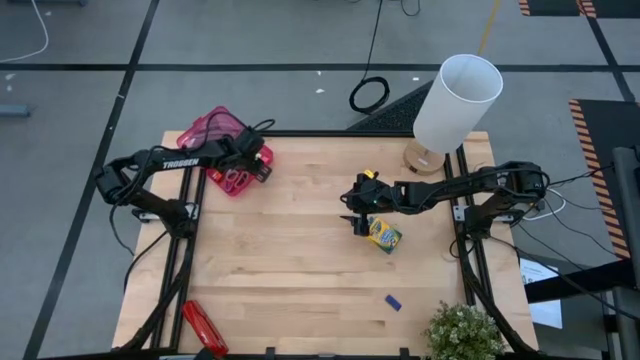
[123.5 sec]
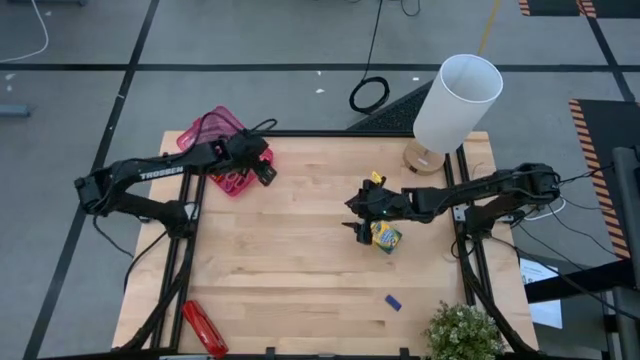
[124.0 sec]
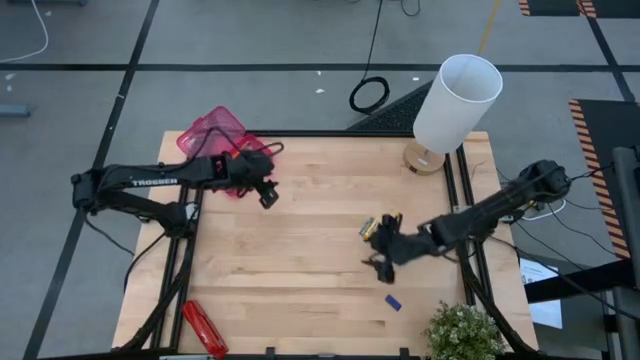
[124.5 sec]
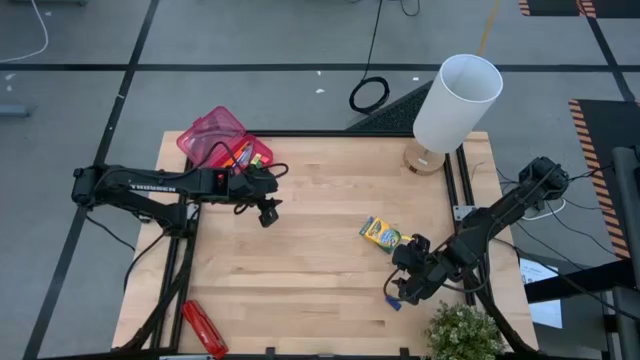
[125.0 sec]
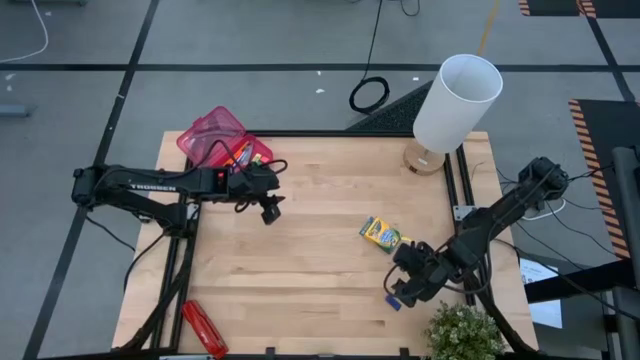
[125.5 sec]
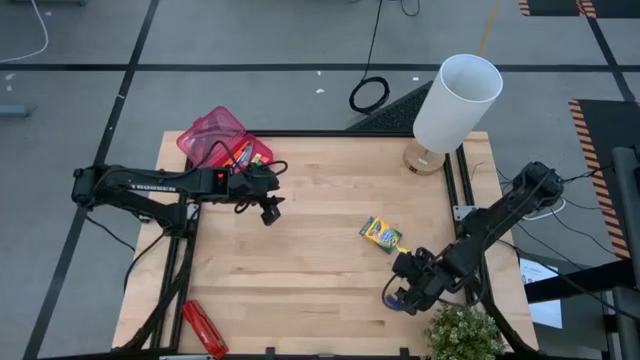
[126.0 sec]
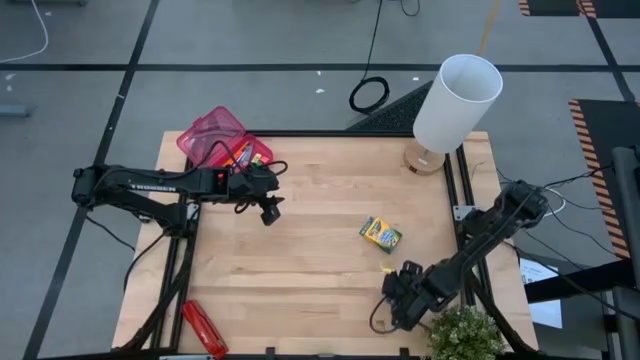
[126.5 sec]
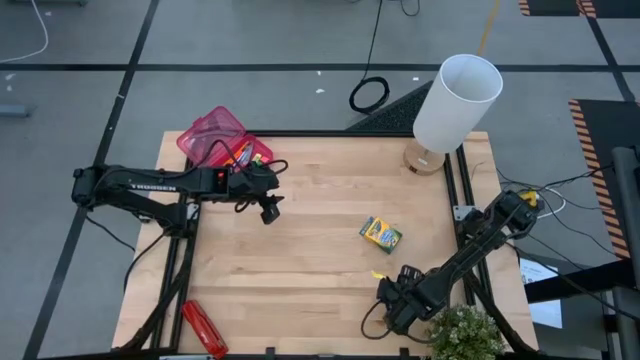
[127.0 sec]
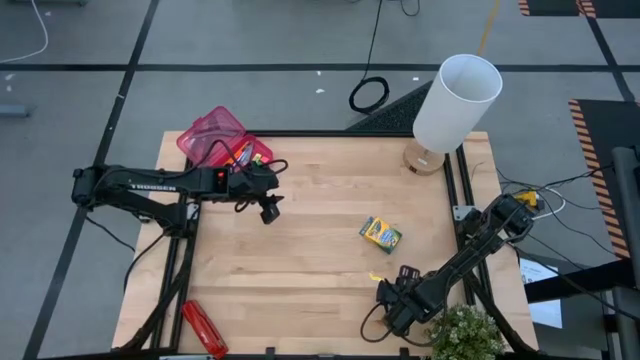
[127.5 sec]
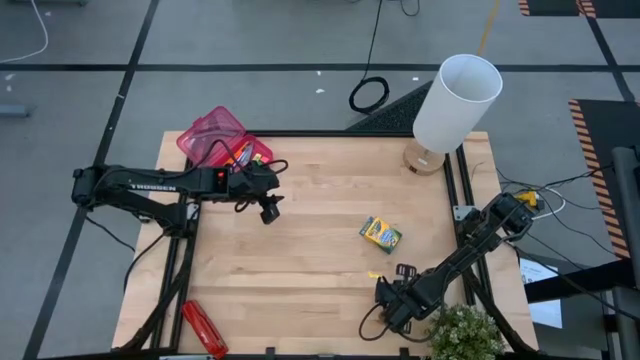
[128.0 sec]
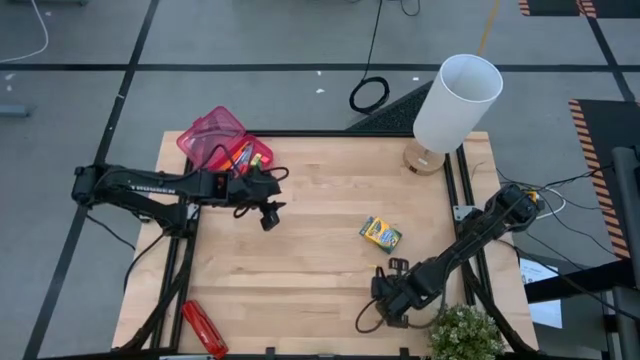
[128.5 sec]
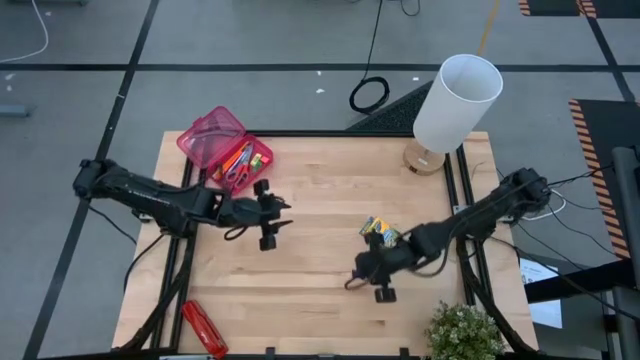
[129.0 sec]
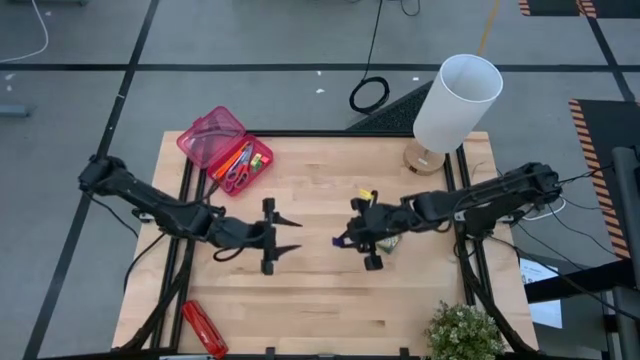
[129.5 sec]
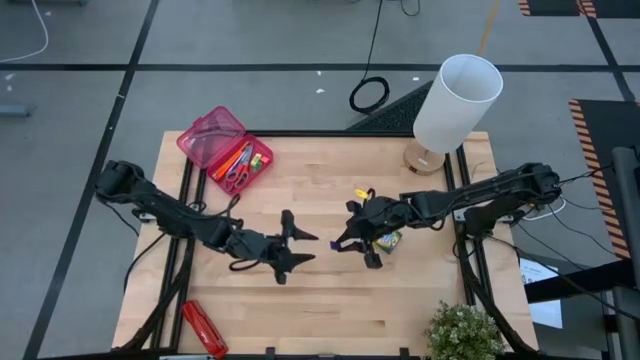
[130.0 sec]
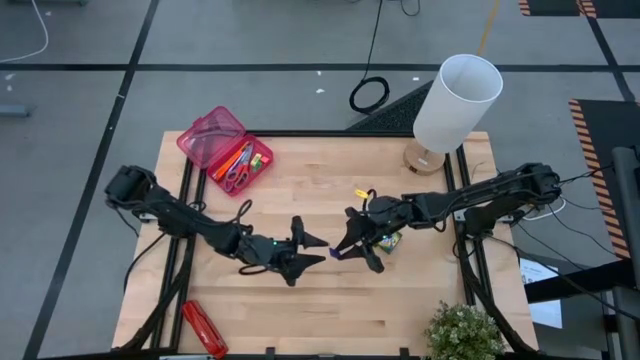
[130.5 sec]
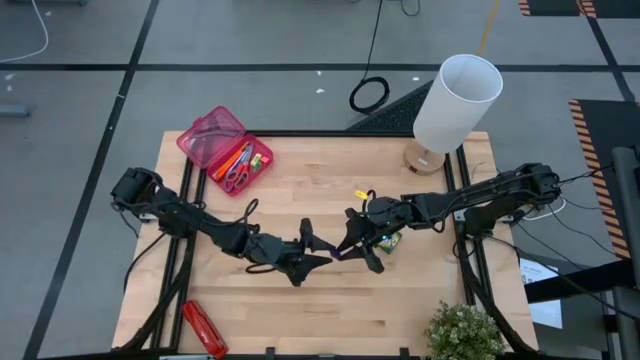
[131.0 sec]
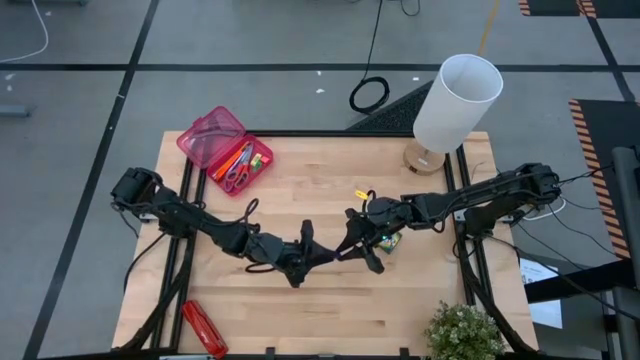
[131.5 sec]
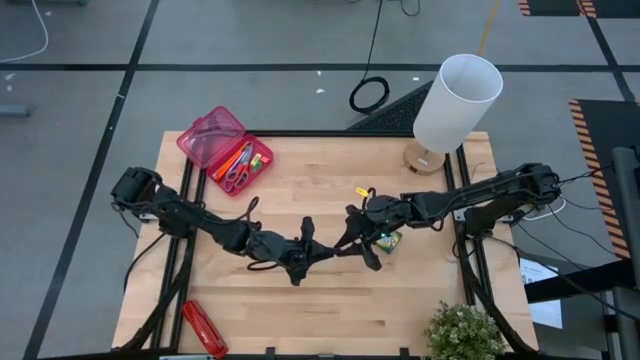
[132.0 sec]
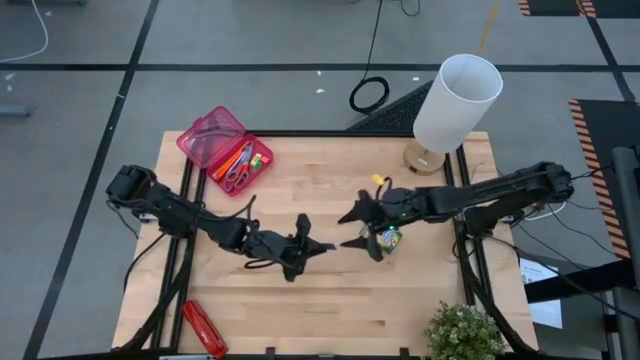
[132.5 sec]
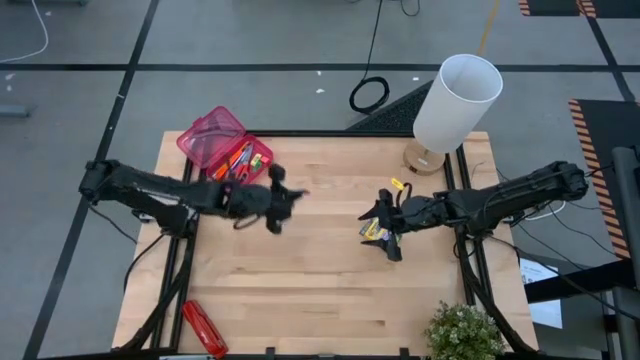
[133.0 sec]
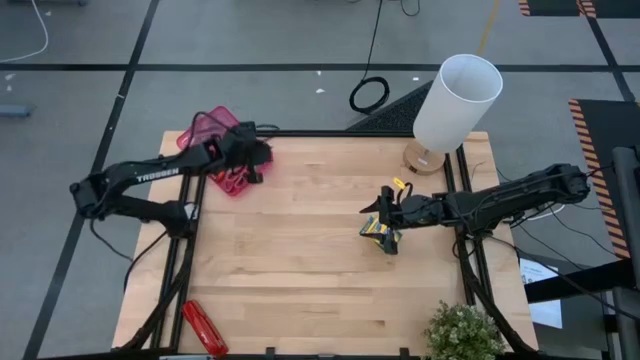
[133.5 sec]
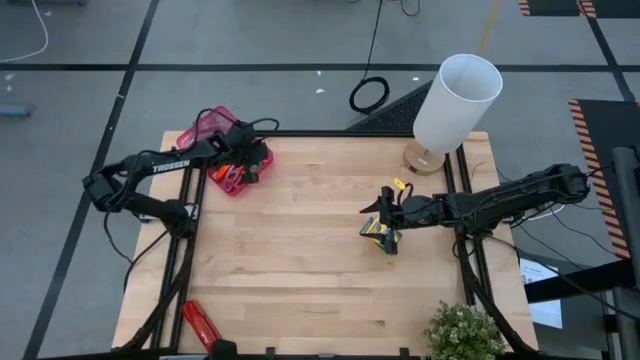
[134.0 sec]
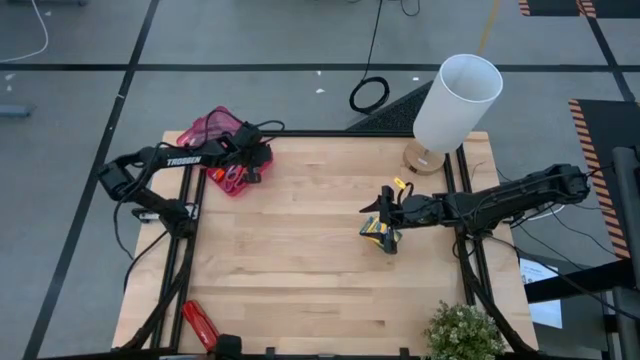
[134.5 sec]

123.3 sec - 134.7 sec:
Task: Pack school essentials
Put the blue eraser into the pink supply box

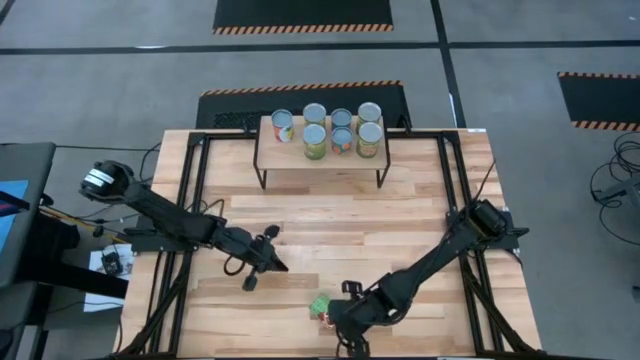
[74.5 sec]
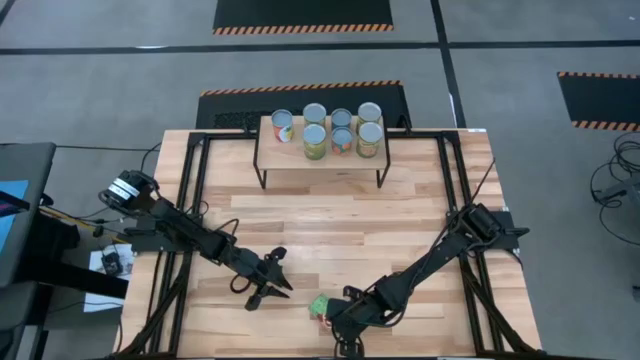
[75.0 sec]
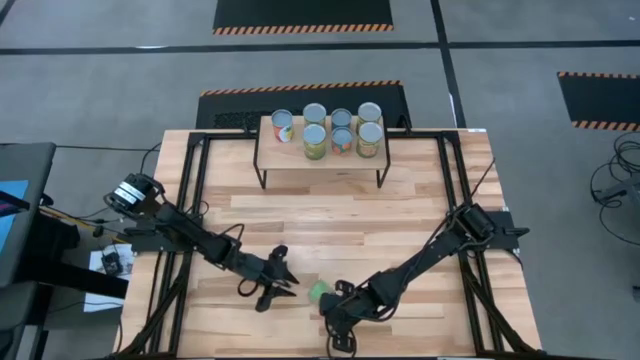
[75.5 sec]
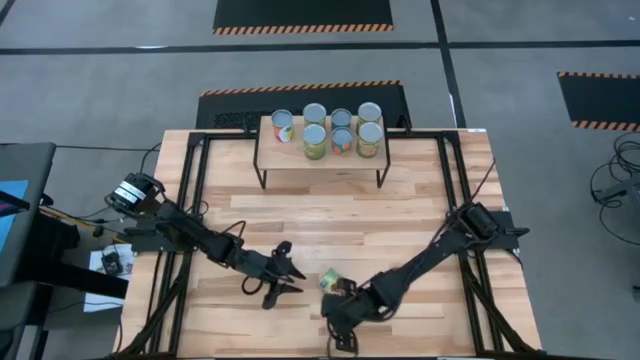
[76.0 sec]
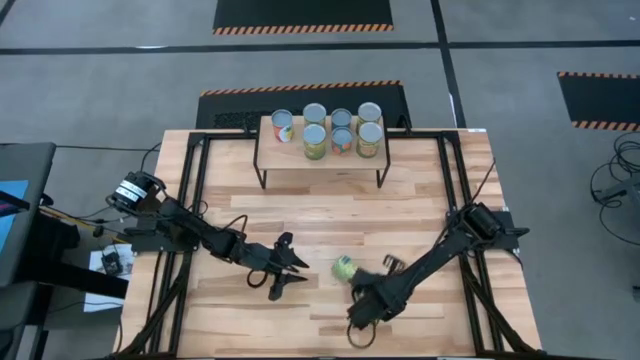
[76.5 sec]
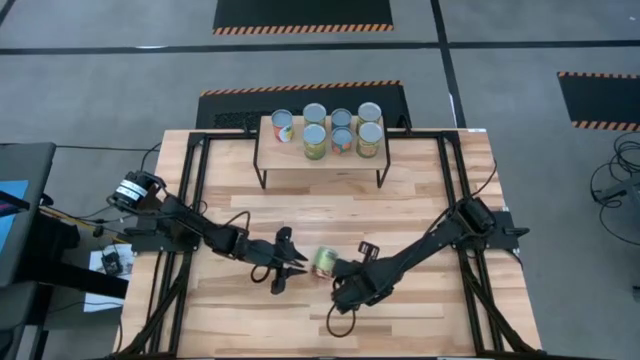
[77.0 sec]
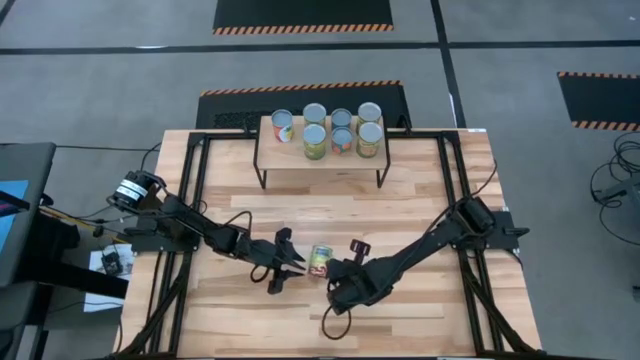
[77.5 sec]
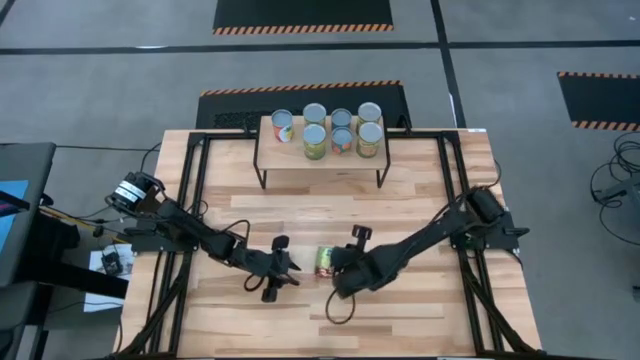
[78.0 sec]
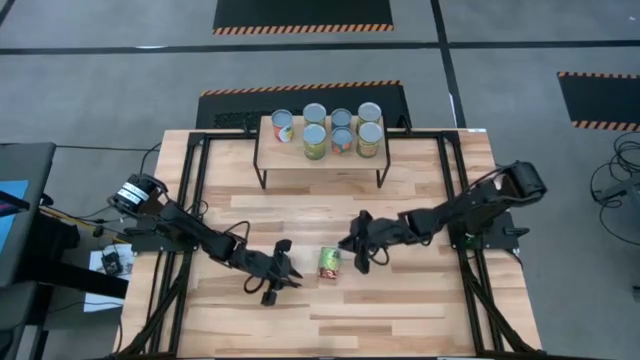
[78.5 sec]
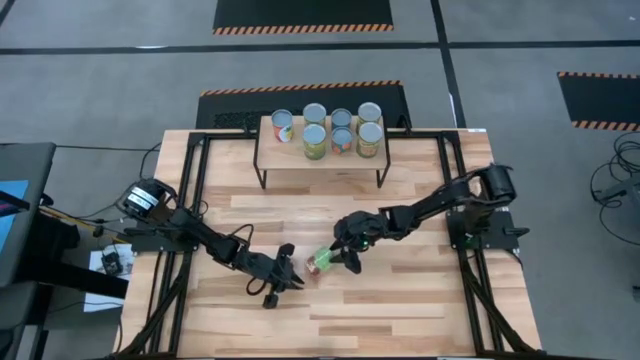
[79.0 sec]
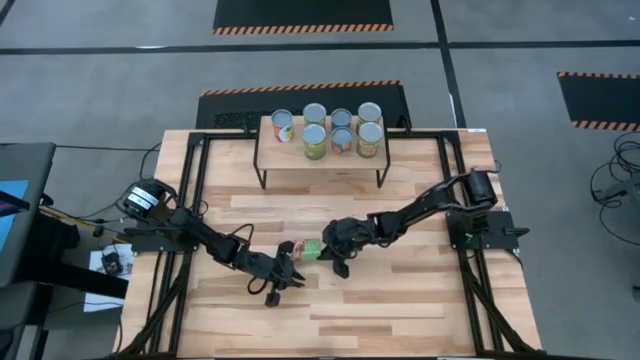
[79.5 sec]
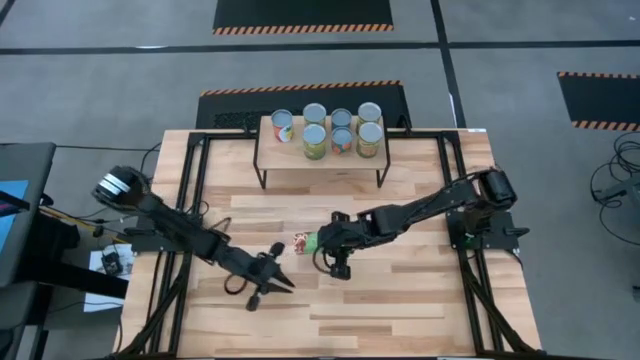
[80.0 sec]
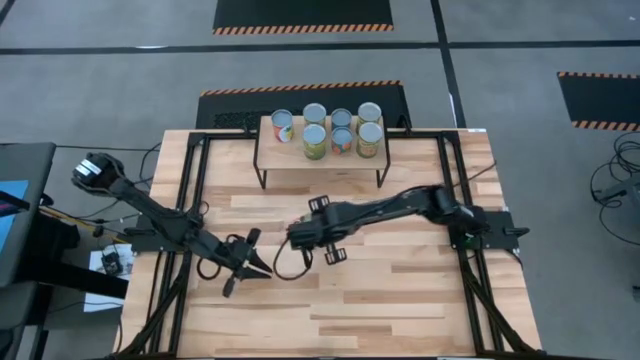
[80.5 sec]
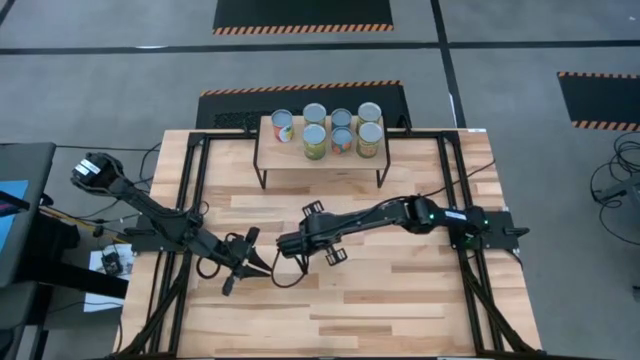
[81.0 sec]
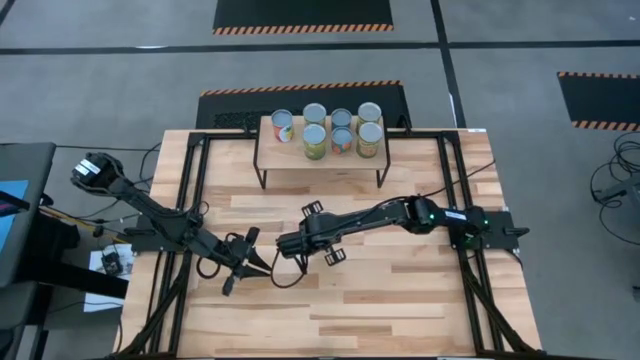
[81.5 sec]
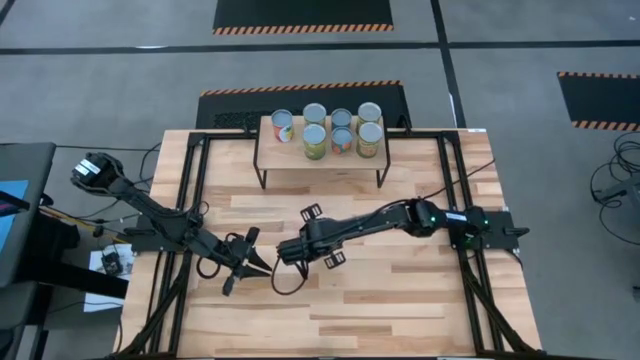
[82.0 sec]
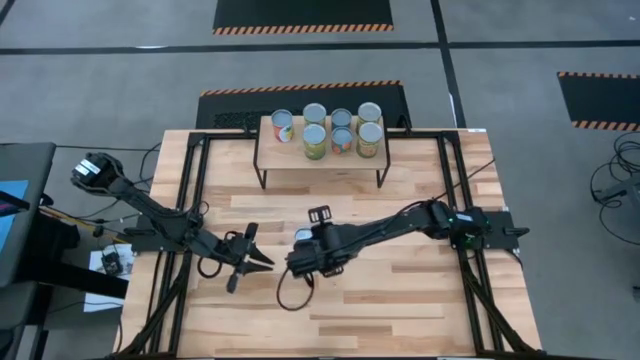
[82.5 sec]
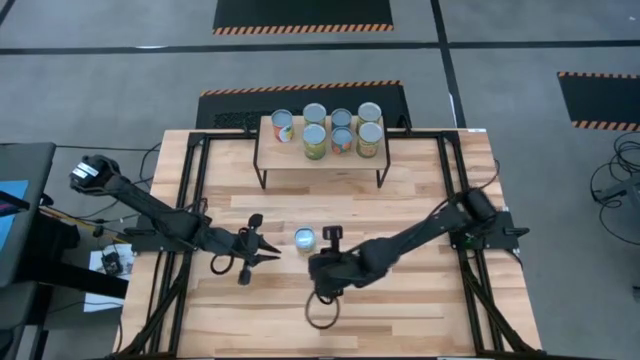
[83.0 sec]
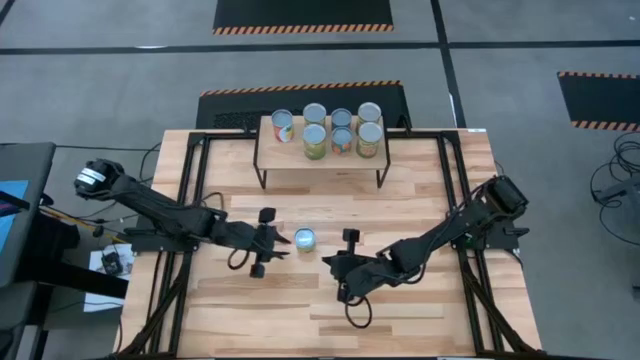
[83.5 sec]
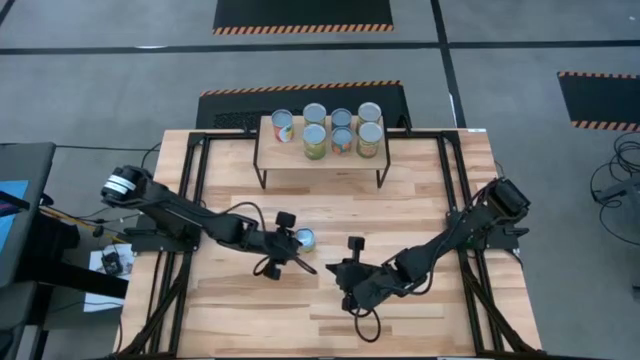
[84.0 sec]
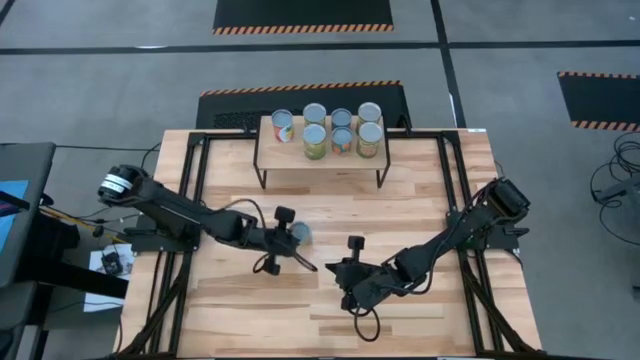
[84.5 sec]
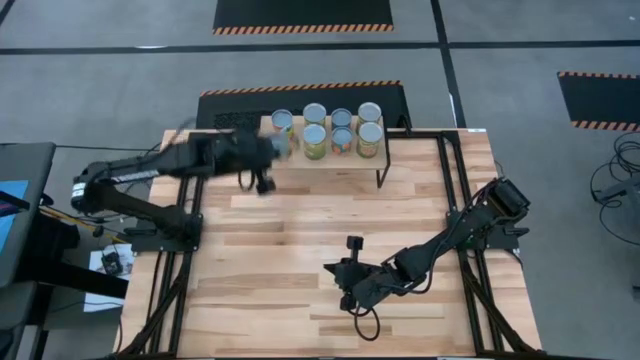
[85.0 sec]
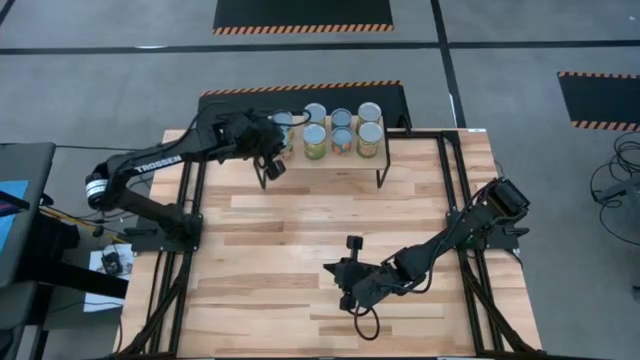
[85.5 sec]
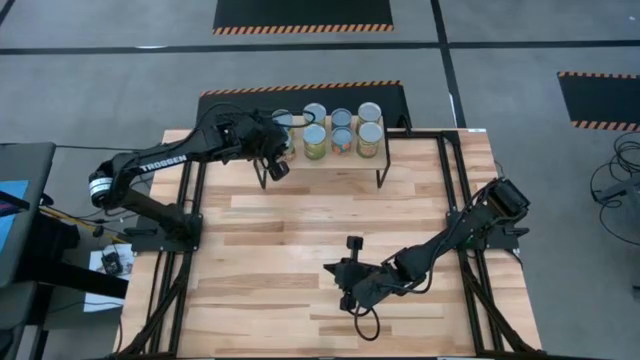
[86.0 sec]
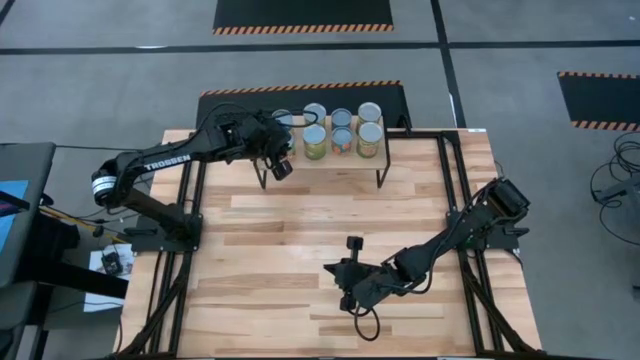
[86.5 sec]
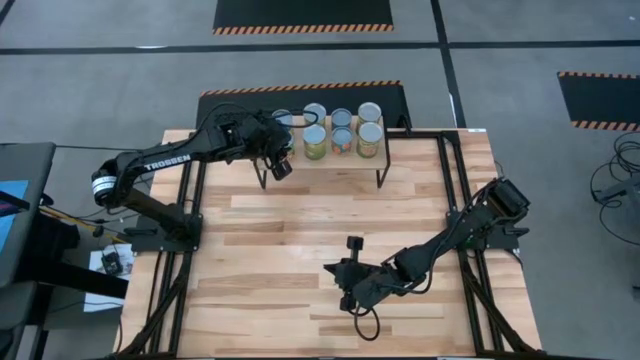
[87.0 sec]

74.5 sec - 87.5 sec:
Task: Pick and place cans onto a shelf
Put the red small can on the shelf
